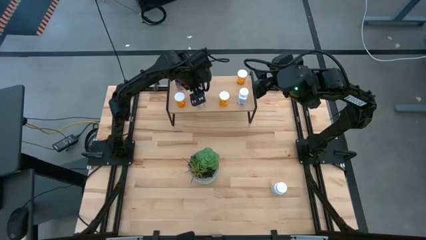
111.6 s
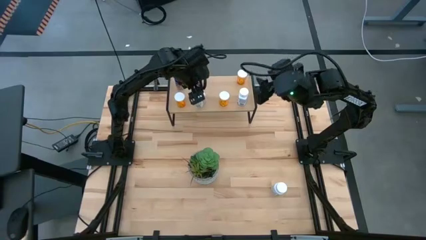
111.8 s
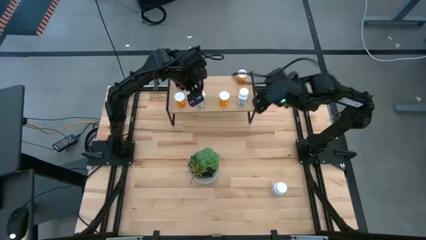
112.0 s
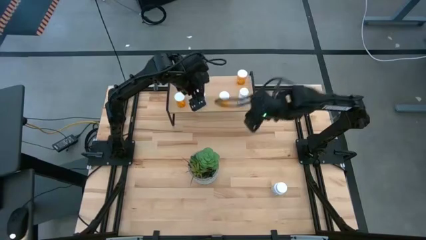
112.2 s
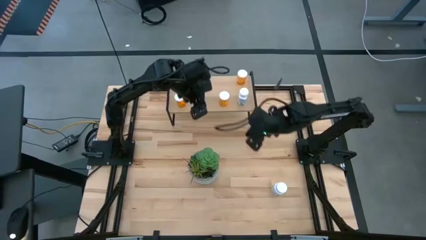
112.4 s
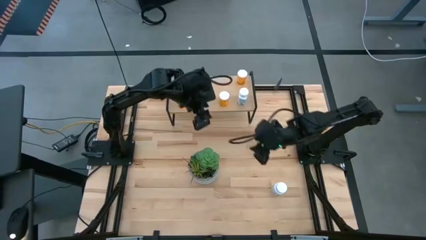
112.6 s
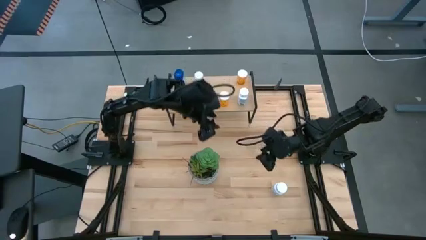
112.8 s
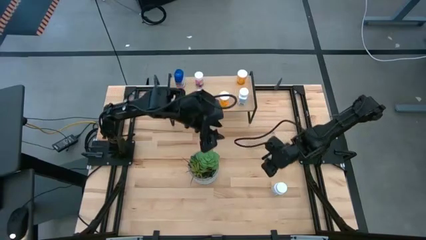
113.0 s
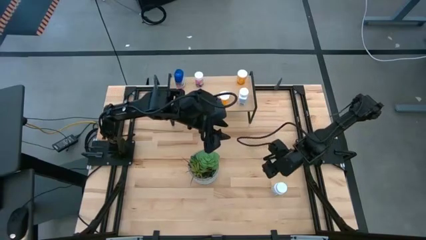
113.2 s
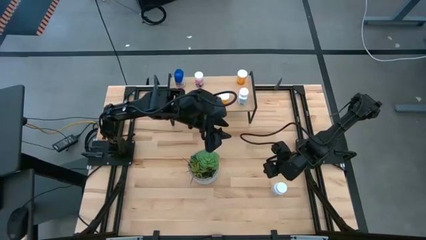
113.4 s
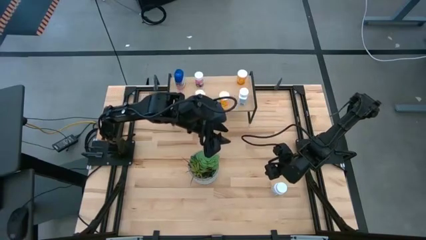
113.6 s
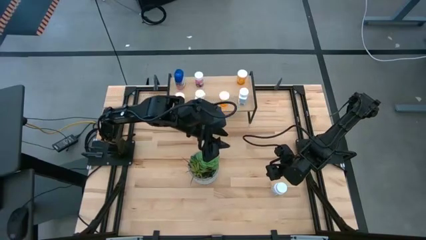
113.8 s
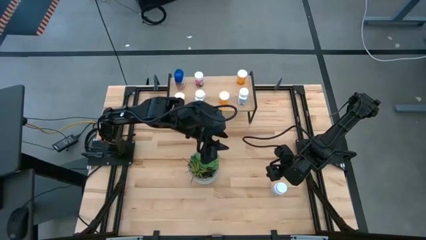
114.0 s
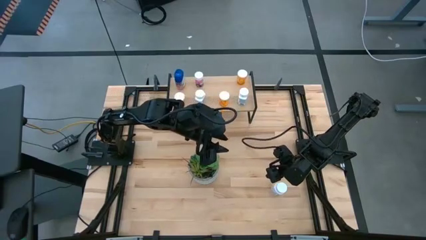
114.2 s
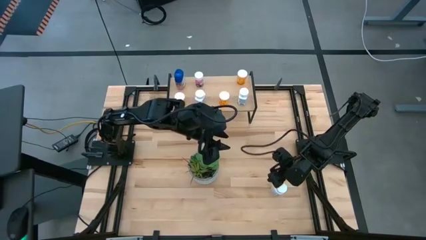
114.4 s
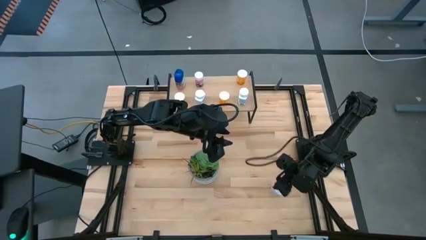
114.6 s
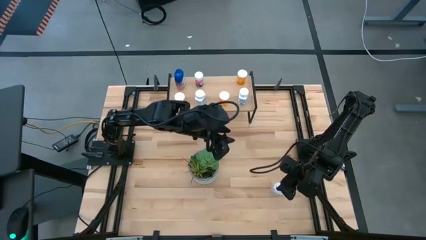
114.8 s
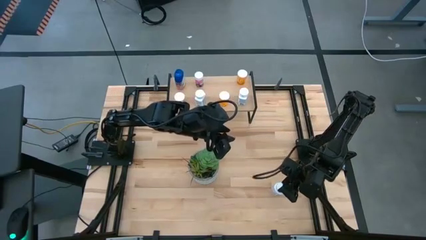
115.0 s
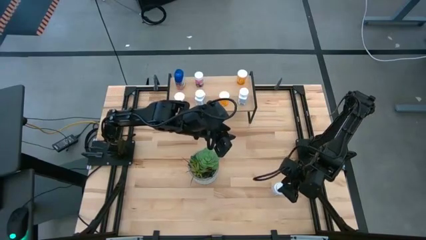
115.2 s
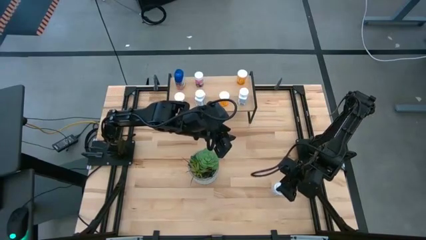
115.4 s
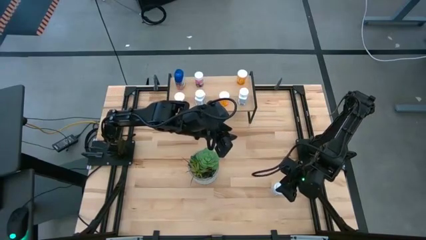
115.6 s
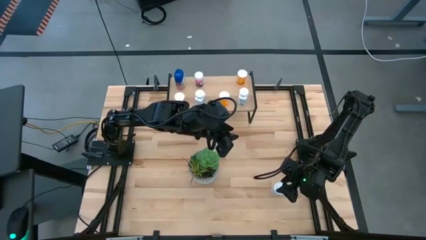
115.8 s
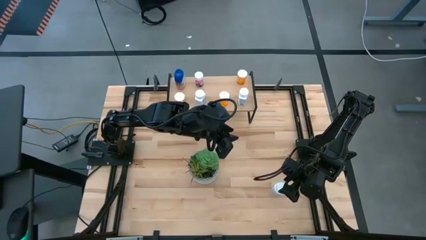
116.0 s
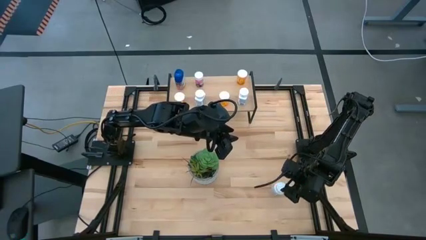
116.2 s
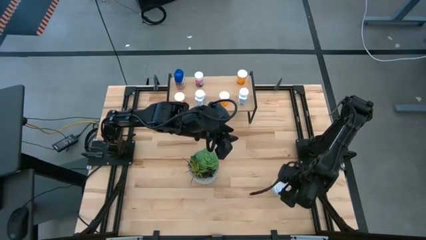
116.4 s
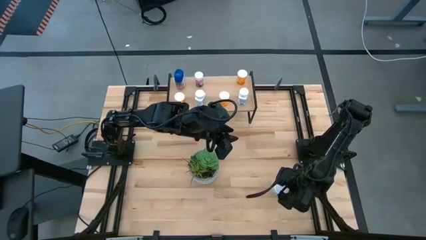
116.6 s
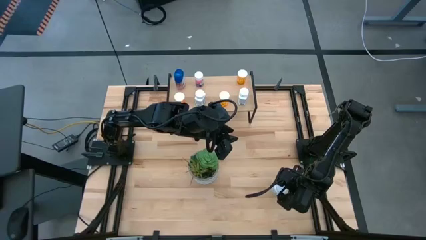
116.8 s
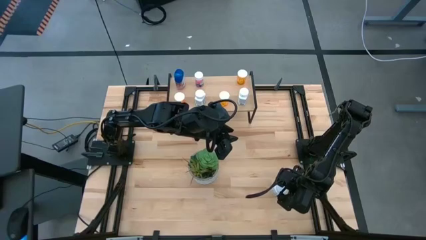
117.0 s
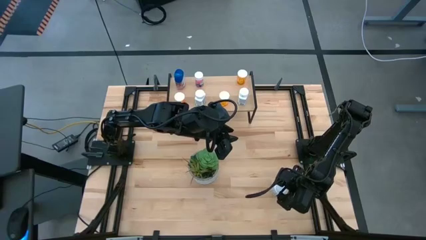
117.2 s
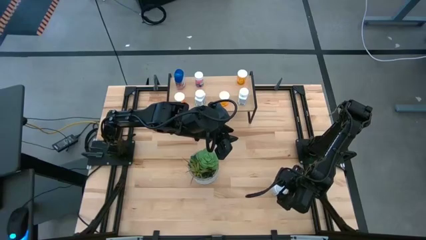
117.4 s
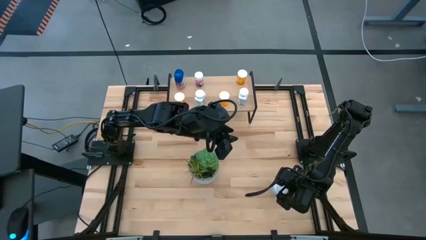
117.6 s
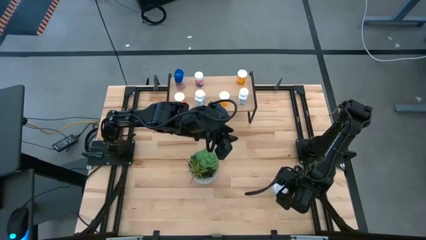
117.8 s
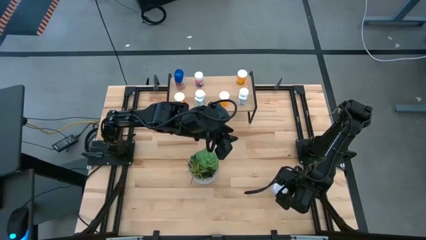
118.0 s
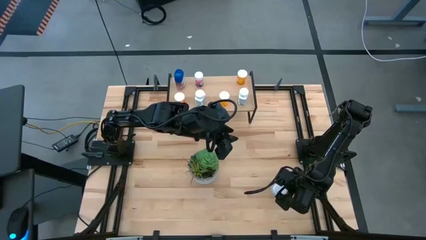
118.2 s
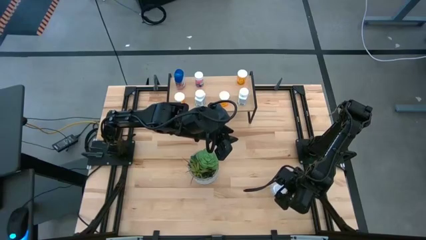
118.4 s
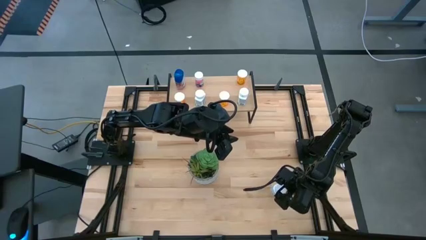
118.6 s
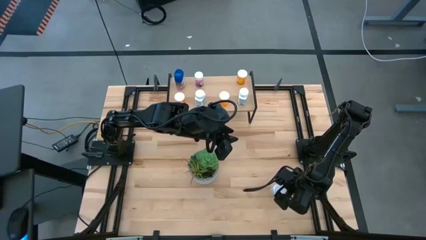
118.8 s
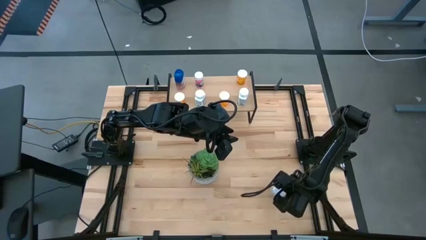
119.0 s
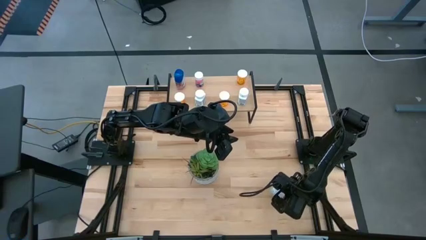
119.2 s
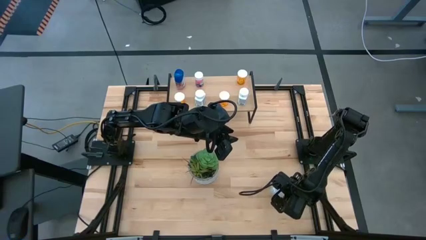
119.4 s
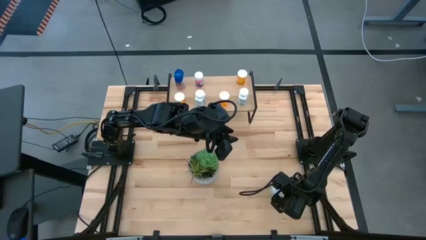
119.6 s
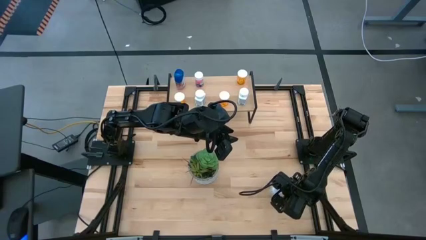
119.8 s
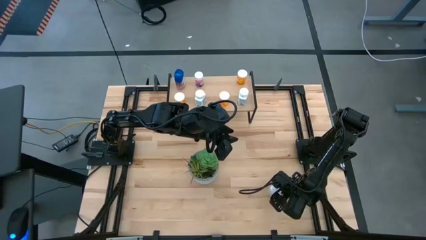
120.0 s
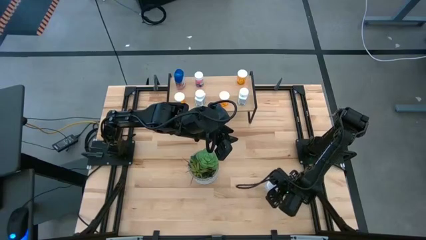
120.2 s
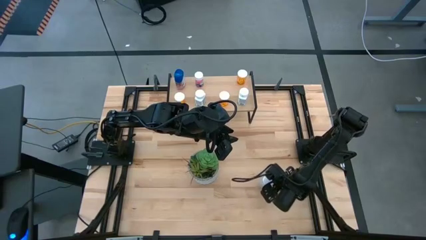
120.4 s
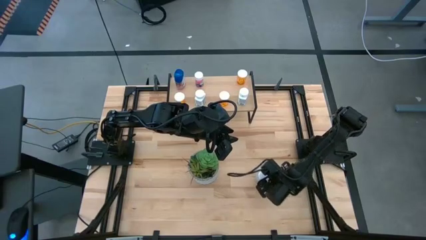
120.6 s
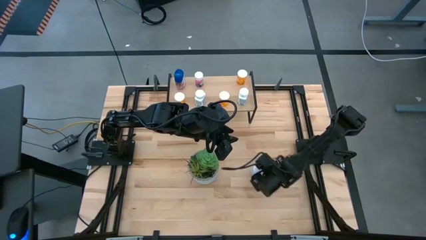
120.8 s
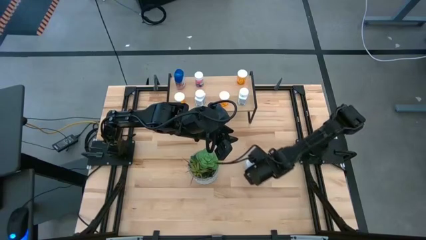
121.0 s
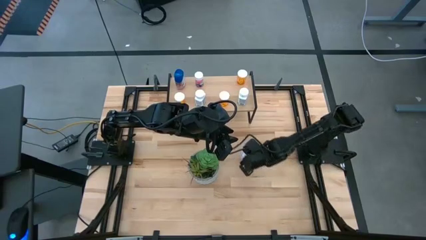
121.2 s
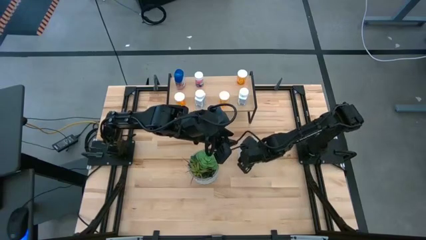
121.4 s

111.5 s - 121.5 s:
Task: Pick and place medicine bottles onto shelf by color
Put the white pill bottle on the shelf
